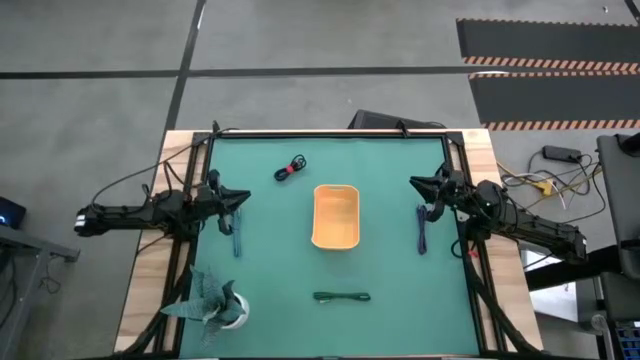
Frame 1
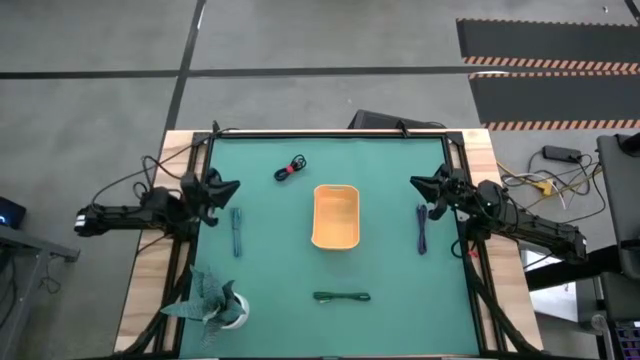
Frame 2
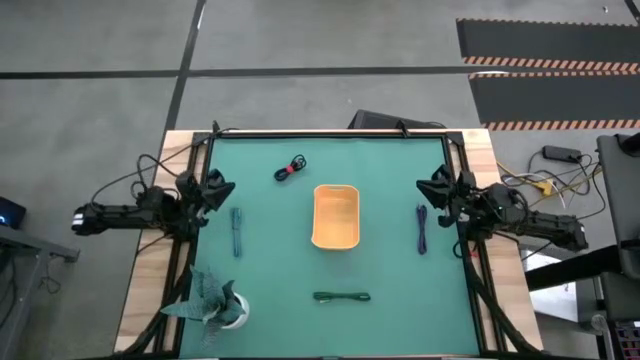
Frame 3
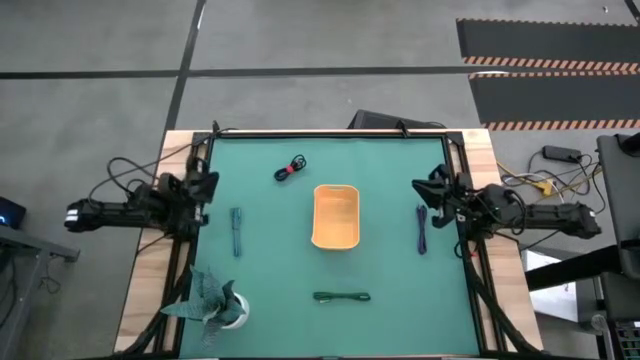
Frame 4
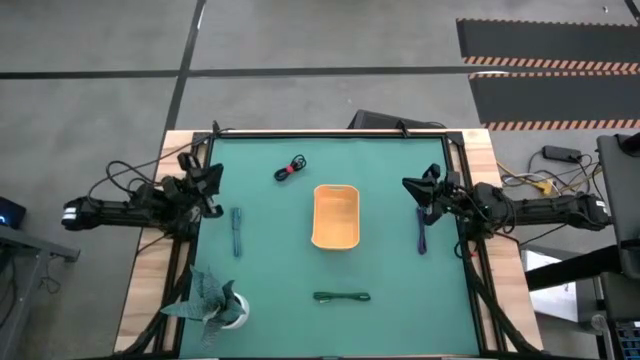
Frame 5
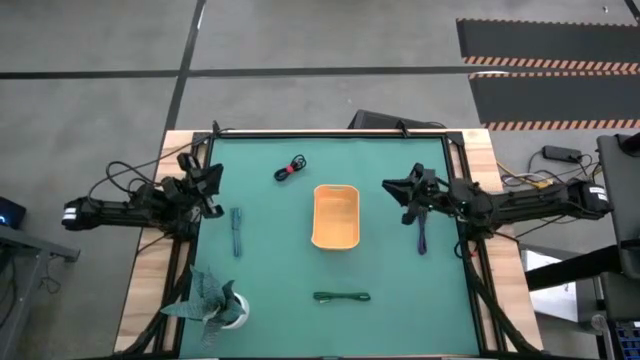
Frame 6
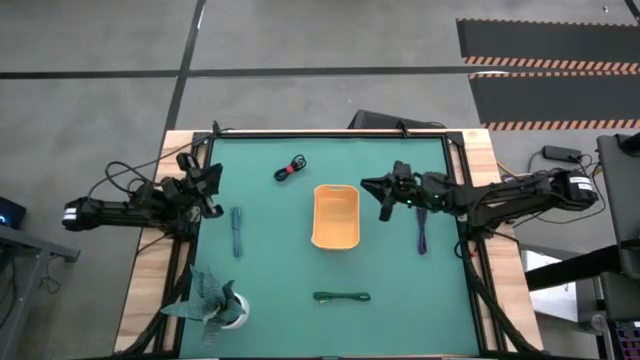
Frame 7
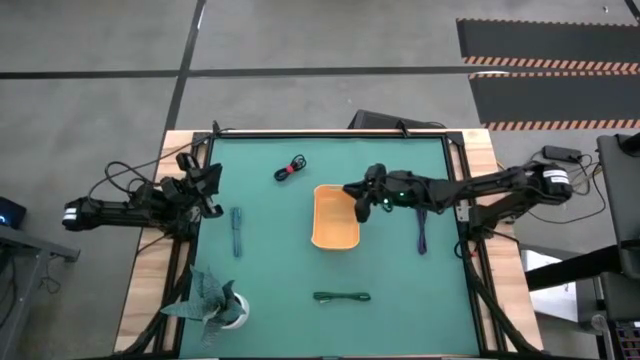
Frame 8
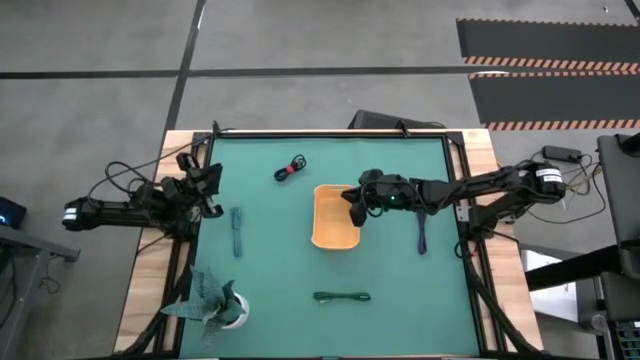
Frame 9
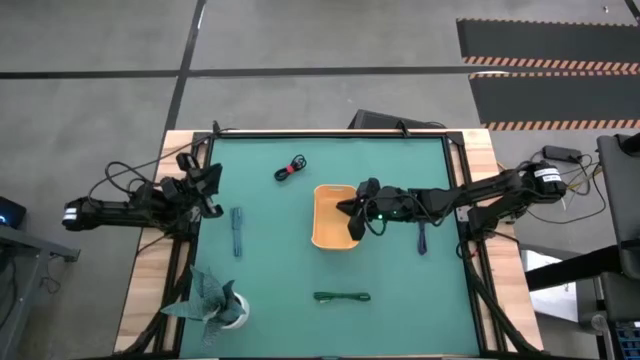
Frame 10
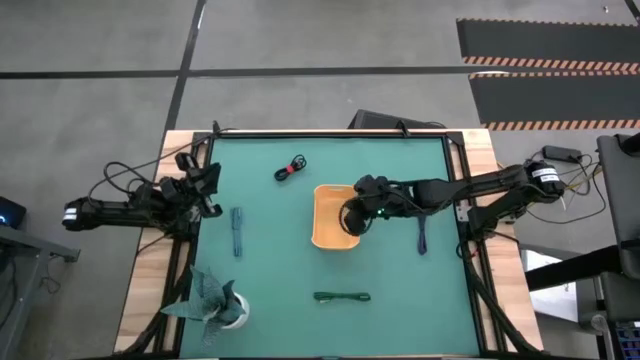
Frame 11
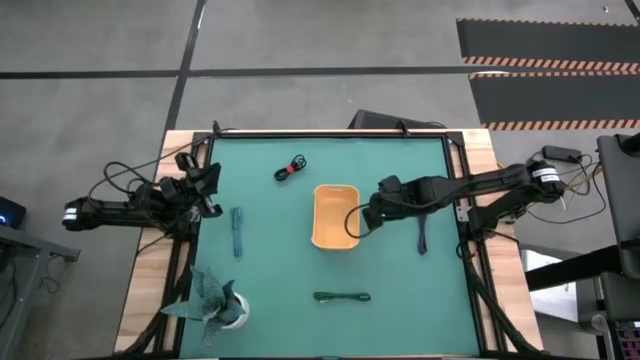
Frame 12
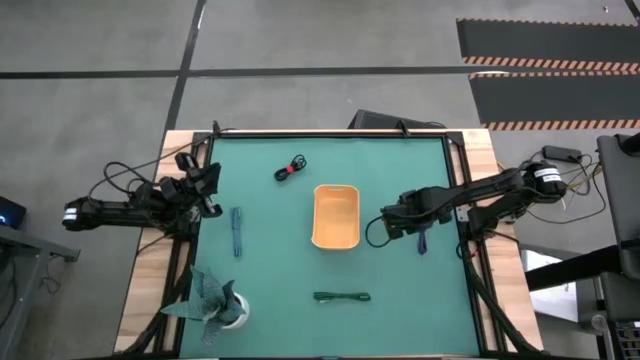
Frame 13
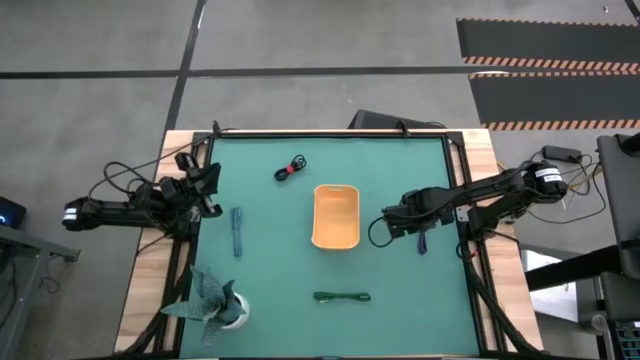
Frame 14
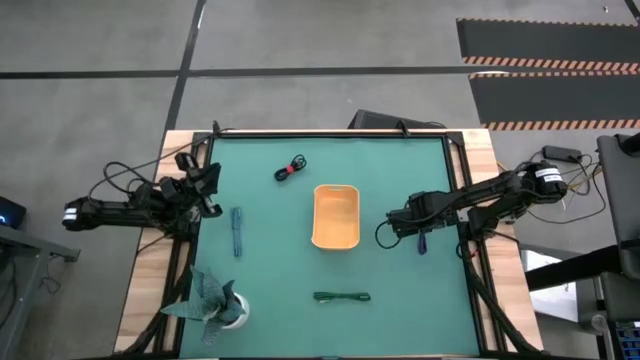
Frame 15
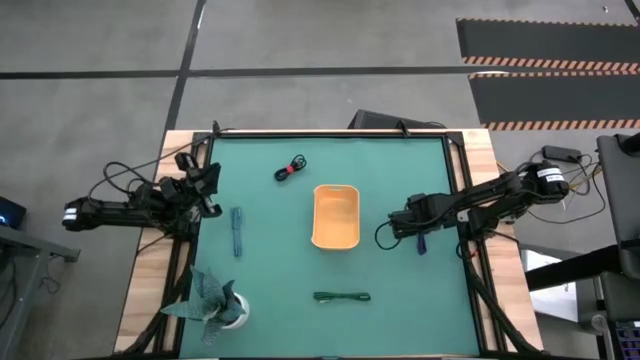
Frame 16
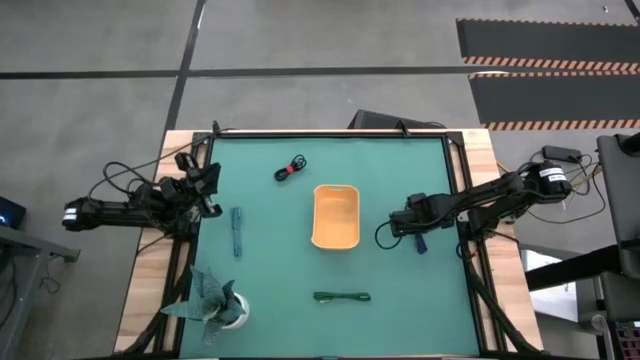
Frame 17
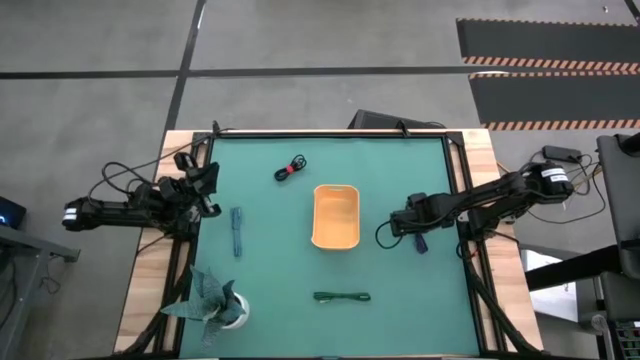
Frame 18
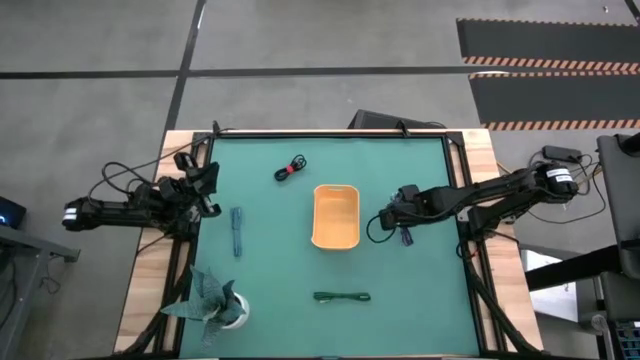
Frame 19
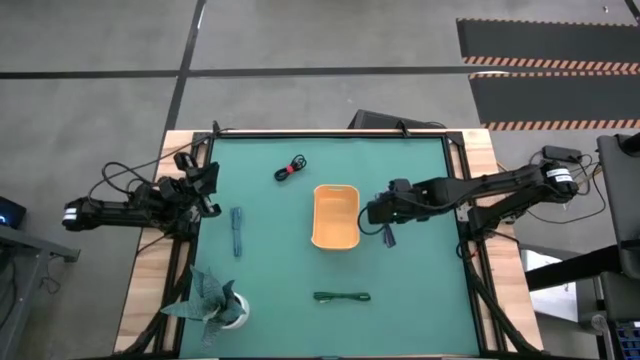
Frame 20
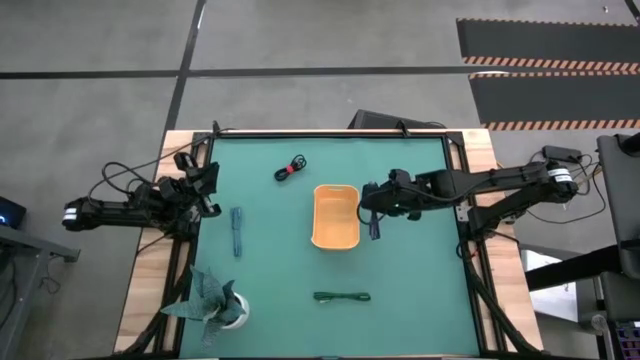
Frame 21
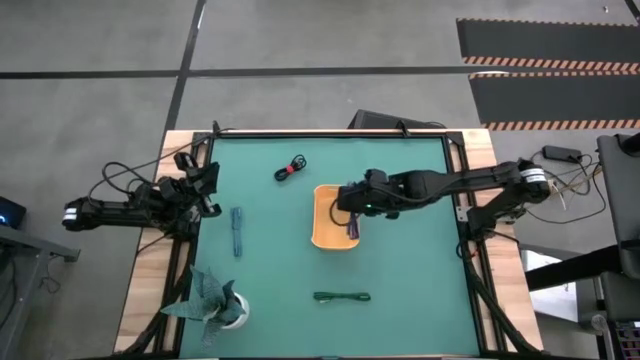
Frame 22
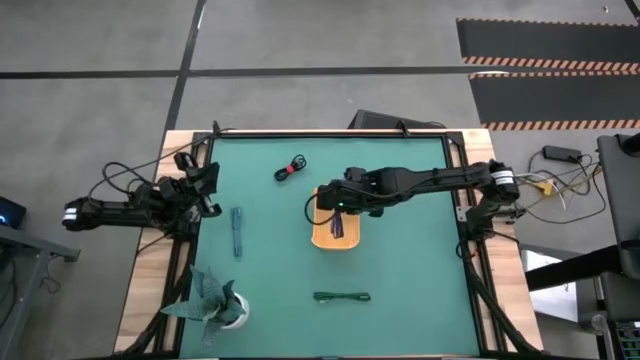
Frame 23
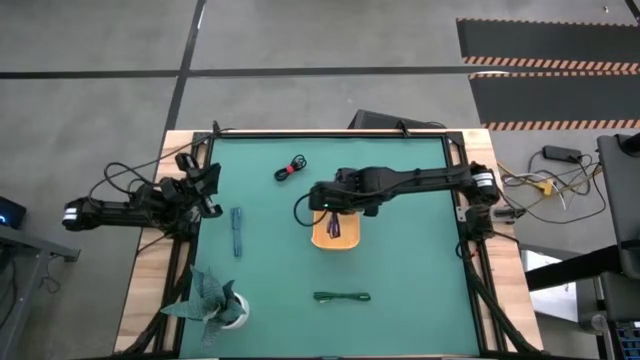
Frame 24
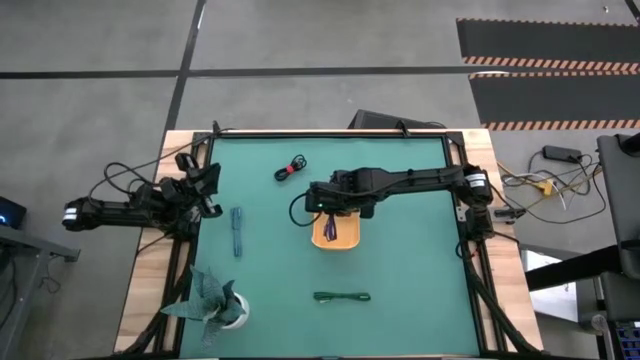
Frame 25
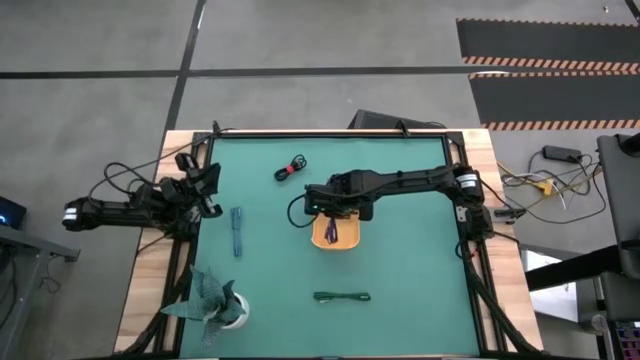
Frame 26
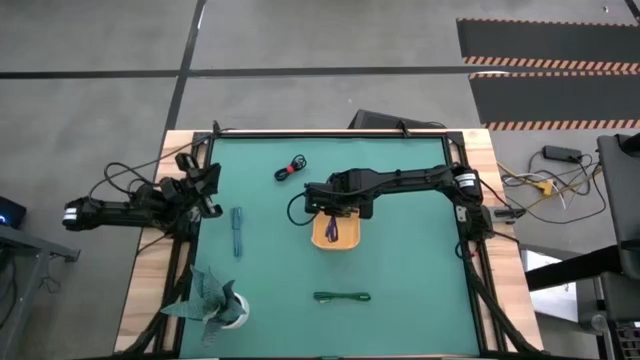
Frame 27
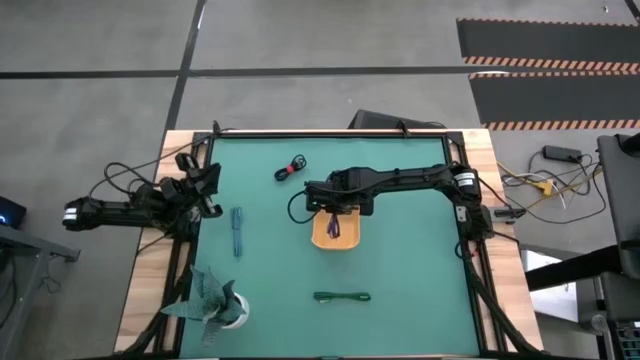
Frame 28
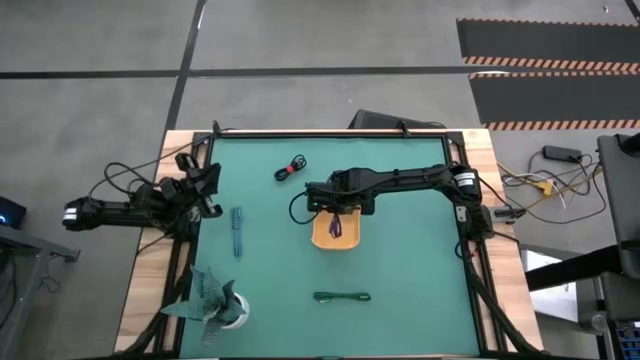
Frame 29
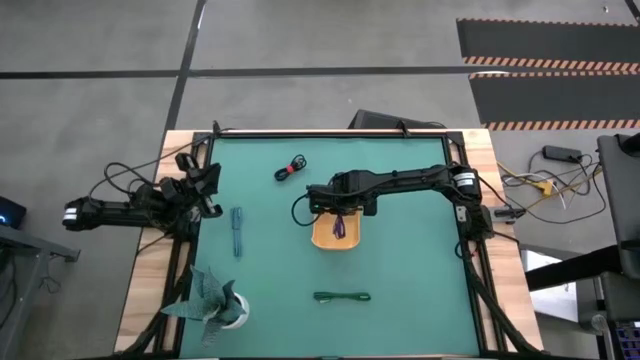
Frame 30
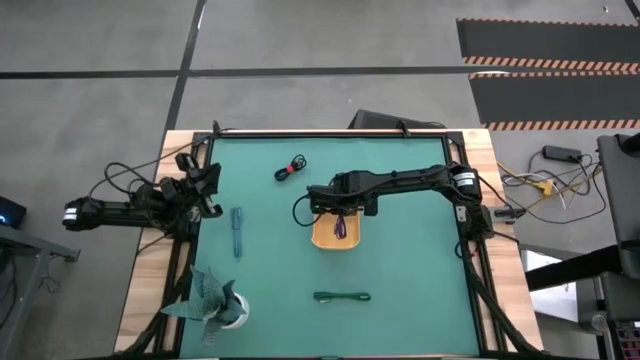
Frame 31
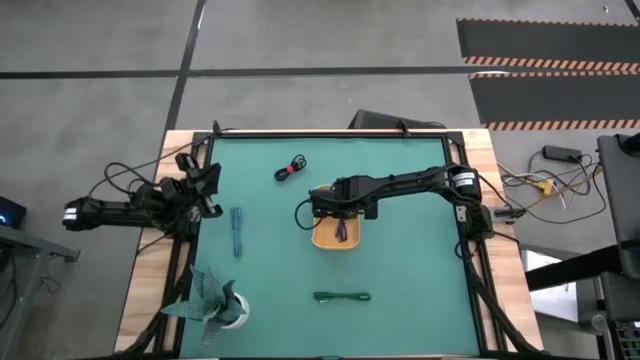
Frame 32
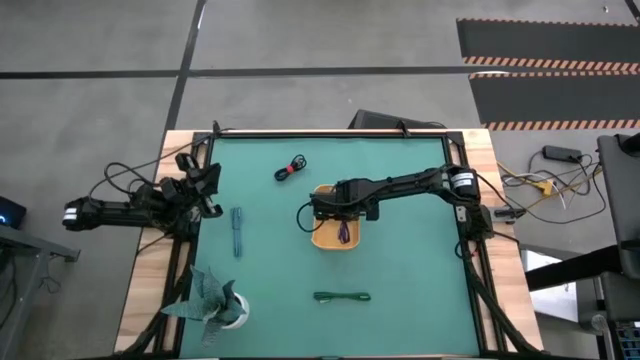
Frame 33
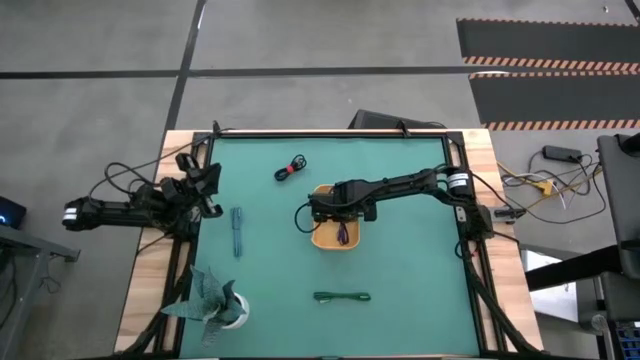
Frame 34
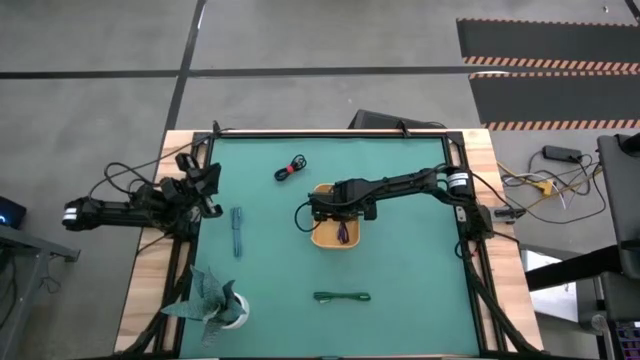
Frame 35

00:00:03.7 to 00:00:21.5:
Task: Pick and place USB-C Cables
Put the purple charger cable into the yellow bin

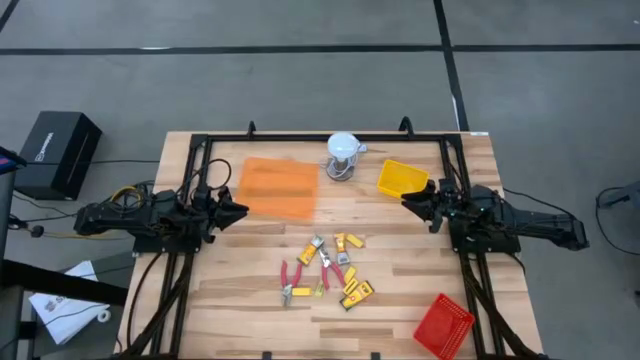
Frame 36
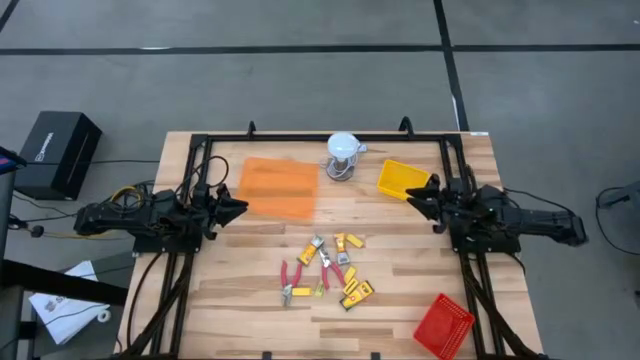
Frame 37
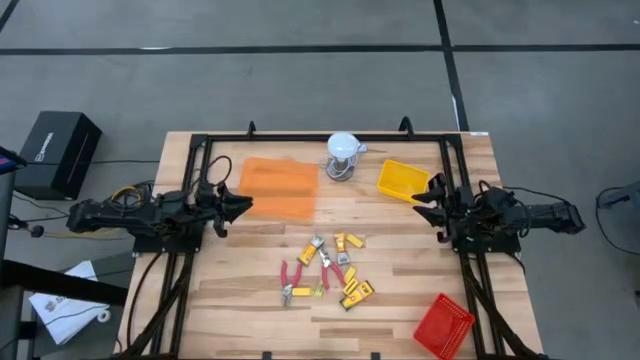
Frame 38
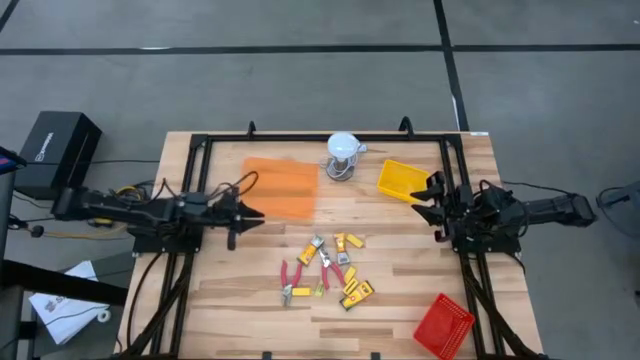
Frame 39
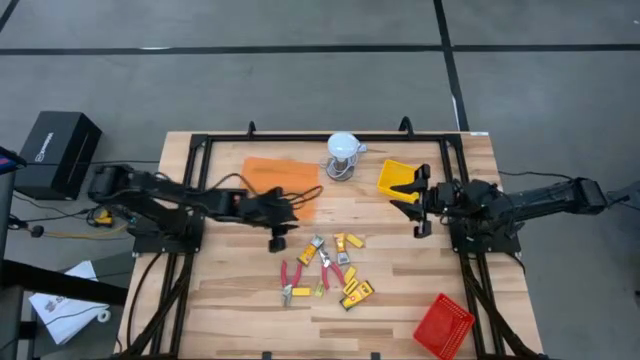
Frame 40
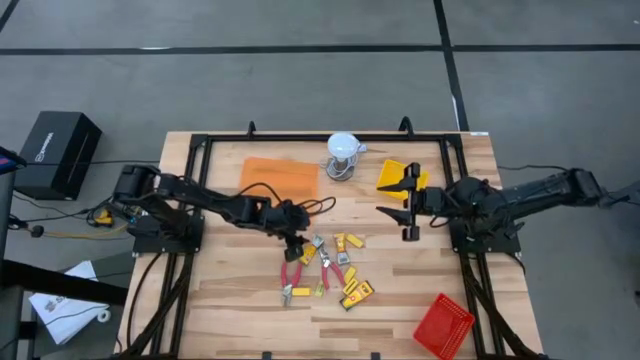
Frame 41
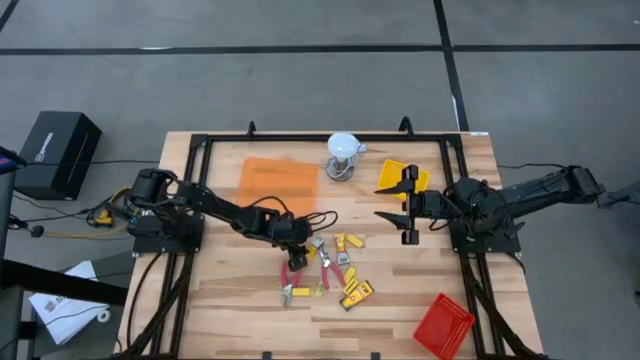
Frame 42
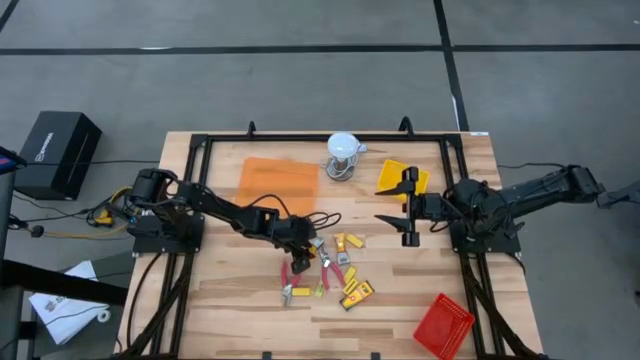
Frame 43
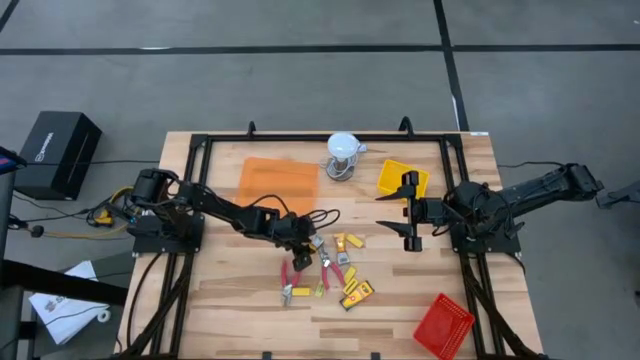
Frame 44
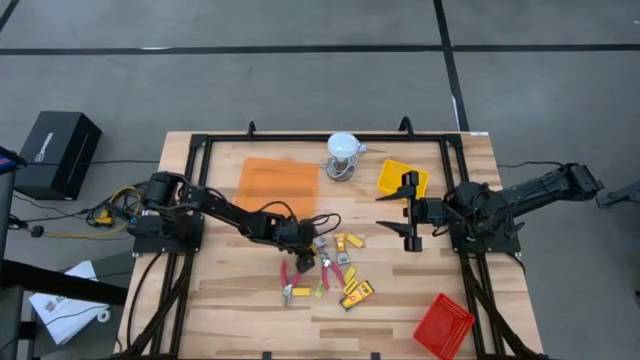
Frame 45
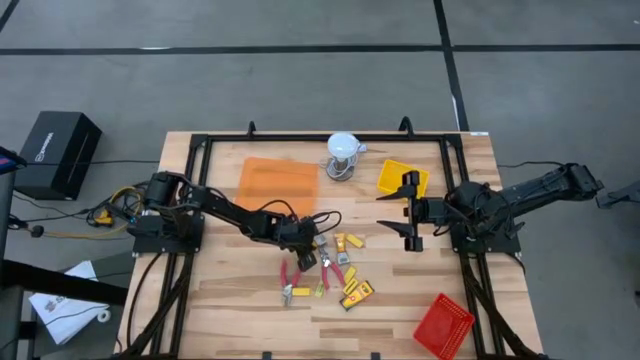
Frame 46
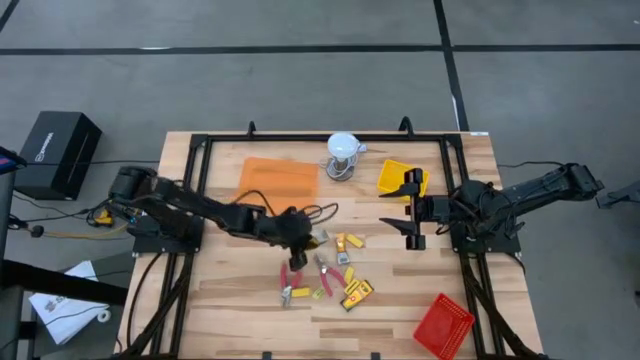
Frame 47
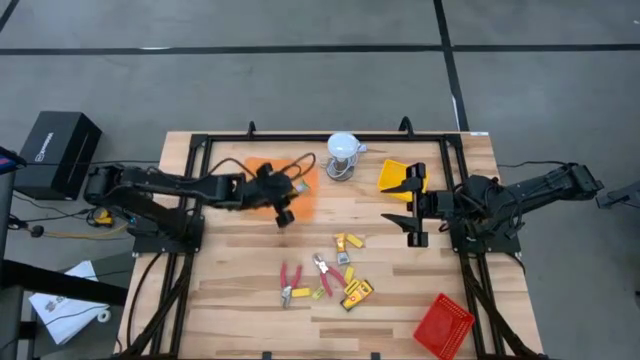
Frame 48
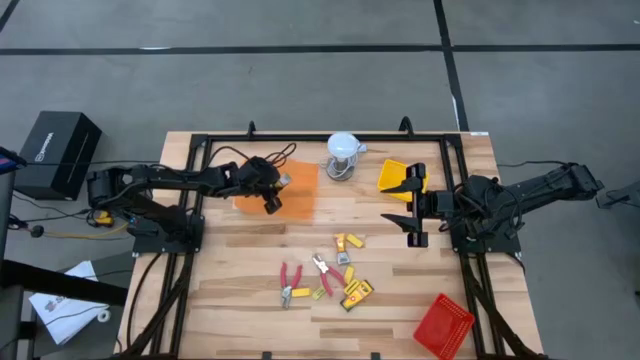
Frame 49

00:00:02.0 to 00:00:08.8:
Task: Pick & Place School Supplies
Put the yellow crayon pack into the orange bin
